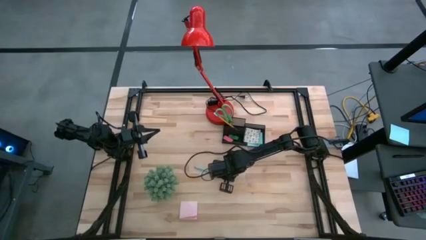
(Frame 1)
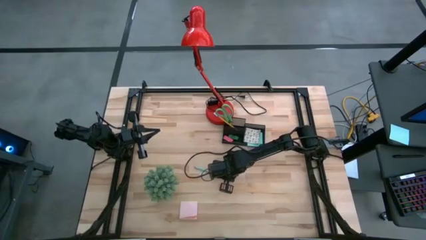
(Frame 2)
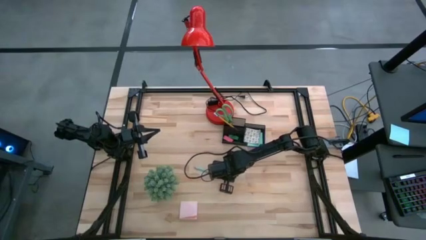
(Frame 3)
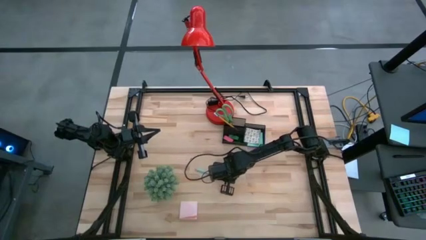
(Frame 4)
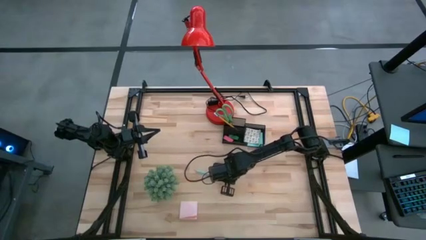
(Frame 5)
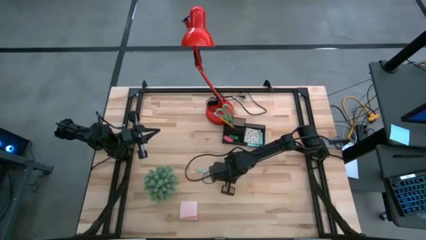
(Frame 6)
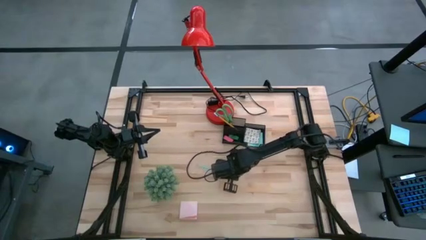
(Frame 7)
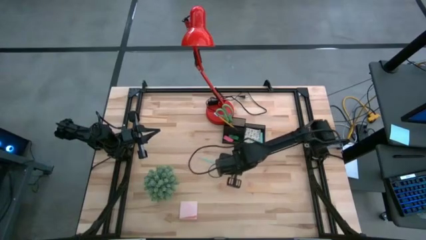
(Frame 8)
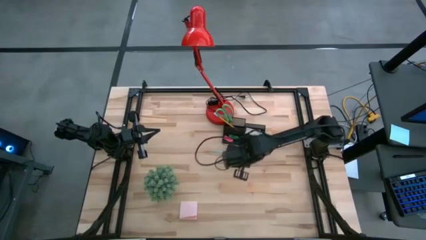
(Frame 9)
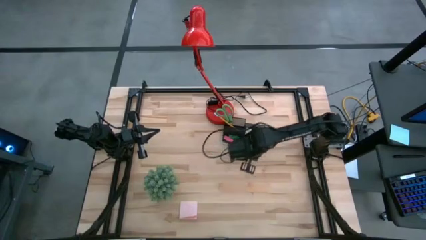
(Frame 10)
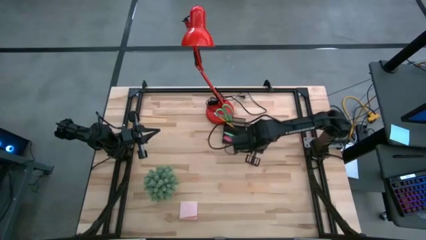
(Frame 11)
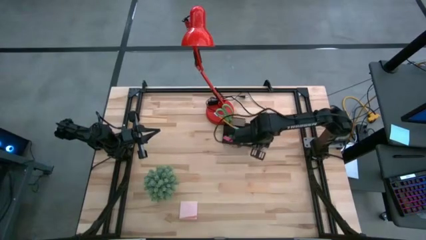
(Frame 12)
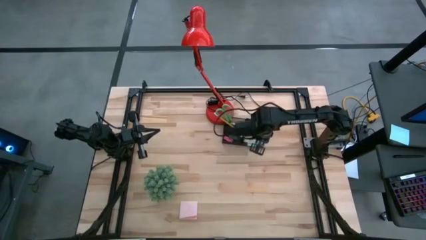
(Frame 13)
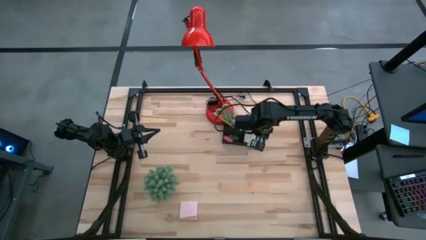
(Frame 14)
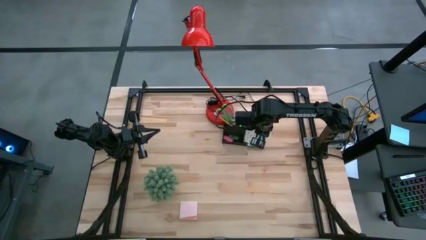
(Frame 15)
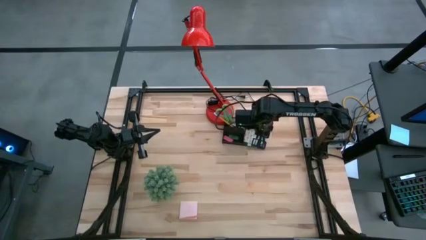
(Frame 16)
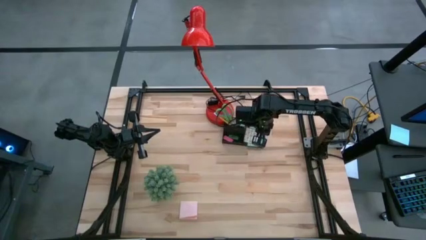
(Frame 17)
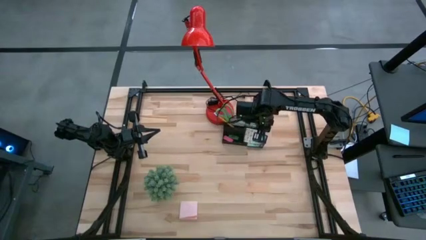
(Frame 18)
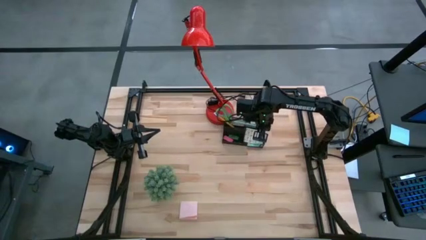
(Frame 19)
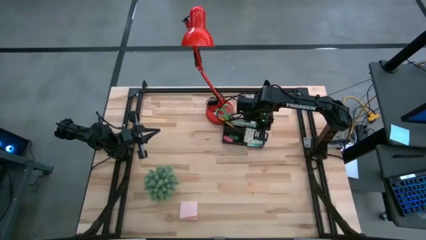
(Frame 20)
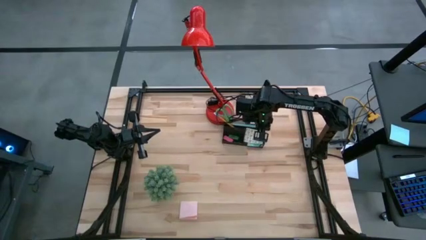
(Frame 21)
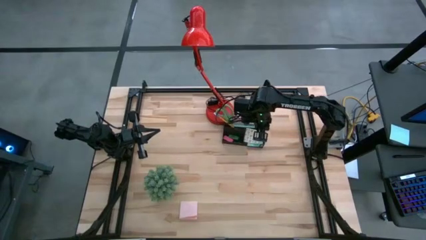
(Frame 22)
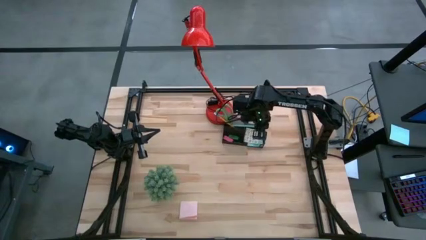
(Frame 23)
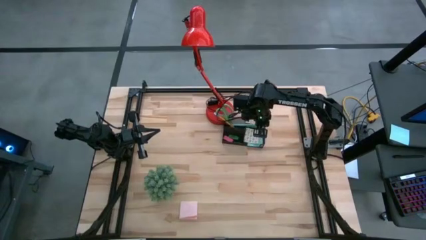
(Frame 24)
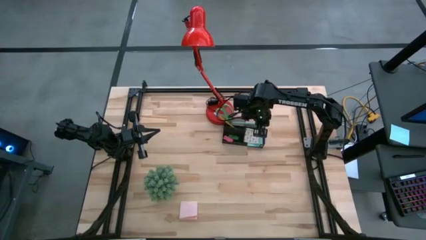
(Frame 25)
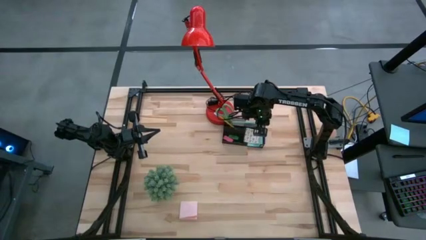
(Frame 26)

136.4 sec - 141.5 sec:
Task: Pick and place office supplies into organizer
Put the blue pencil in the back left compartment of the desk organizer

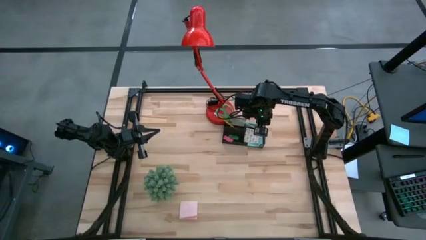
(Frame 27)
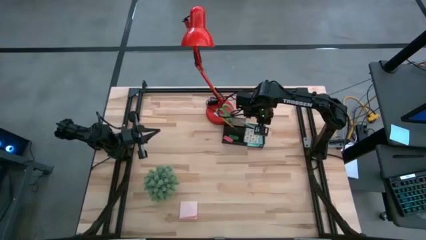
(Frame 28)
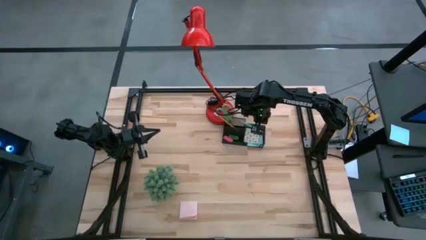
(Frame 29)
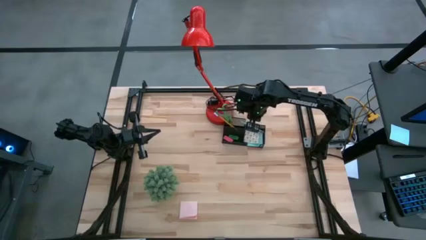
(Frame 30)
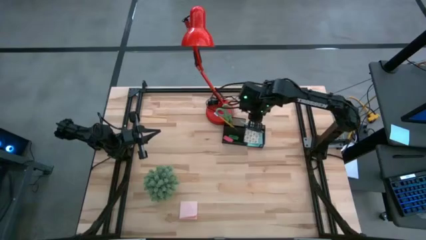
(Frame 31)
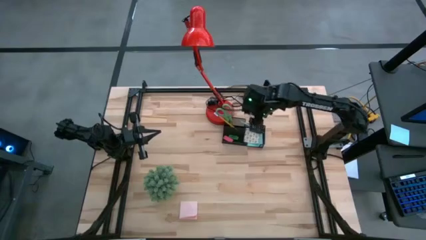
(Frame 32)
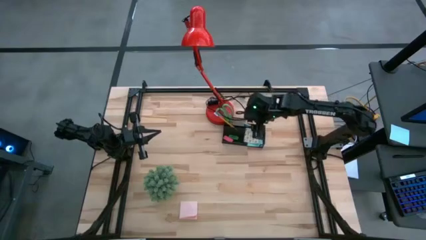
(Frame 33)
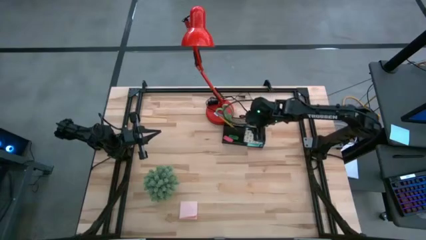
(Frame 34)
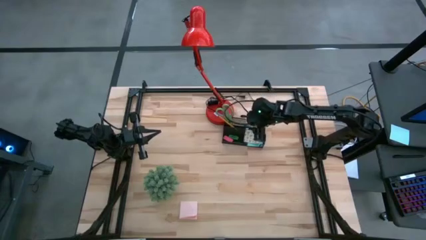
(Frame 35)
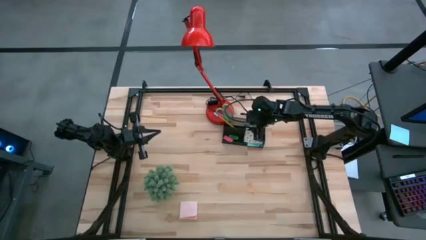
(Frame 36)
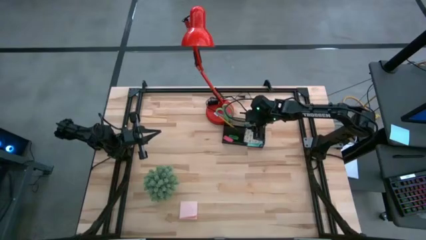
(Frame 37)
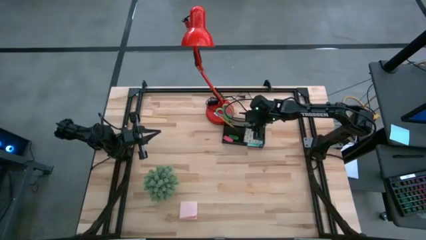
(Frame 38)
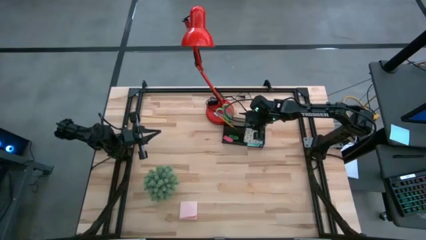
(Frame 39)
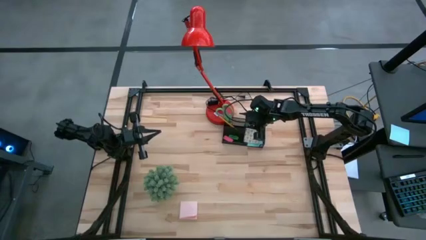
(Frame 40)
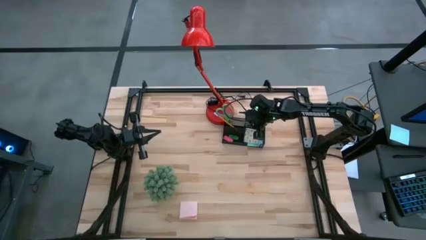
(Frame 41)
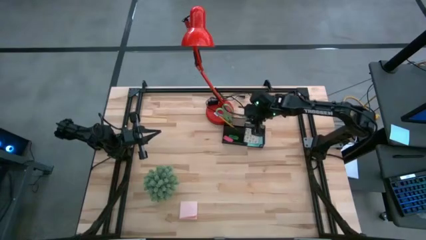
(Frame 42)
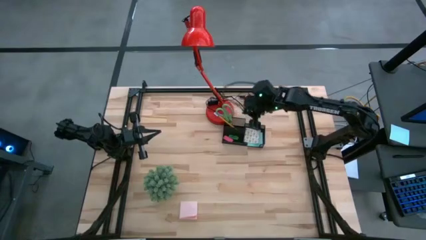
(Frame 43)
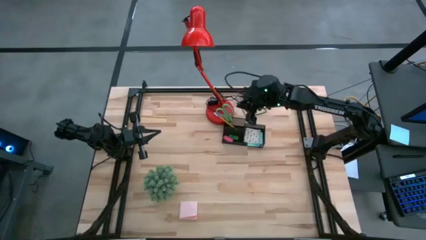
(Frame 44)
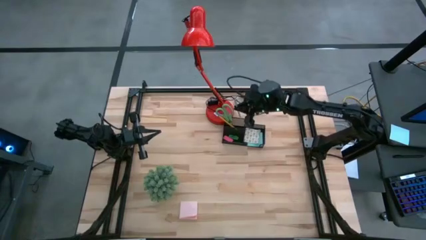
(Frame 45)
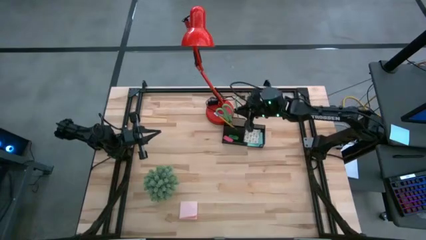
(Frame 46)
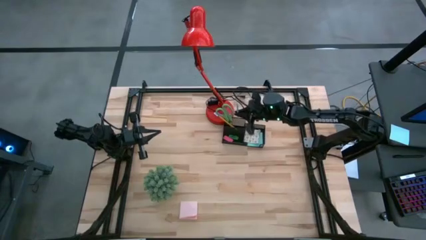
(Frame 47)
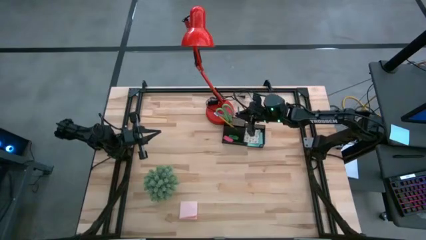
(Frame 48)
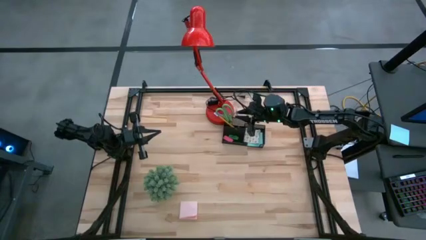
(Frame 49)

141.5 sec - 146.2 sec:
Adjust the blue pencil in the desk organizer

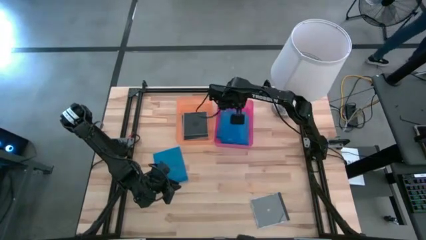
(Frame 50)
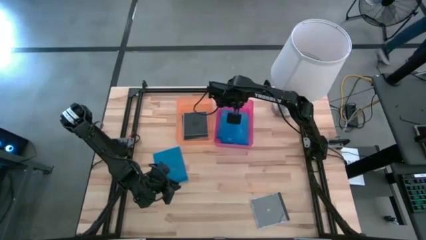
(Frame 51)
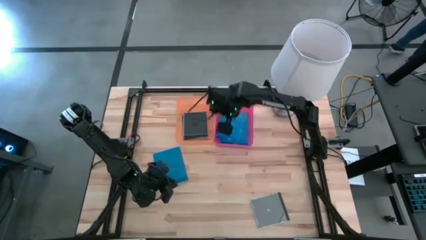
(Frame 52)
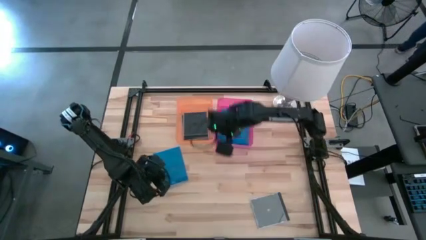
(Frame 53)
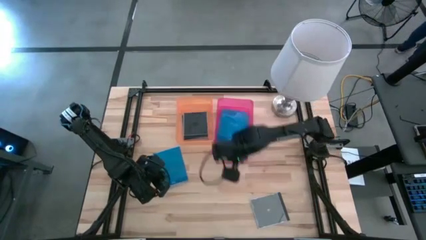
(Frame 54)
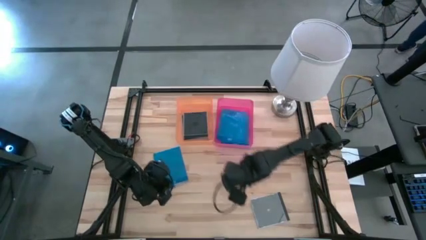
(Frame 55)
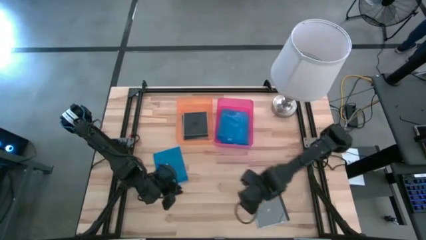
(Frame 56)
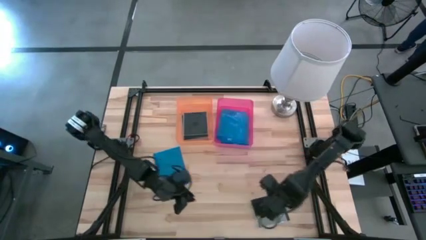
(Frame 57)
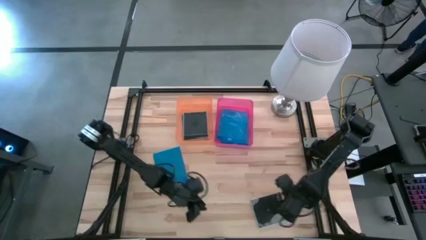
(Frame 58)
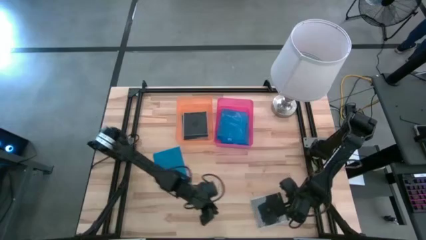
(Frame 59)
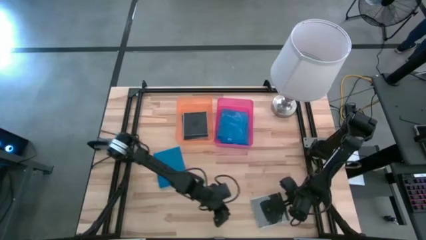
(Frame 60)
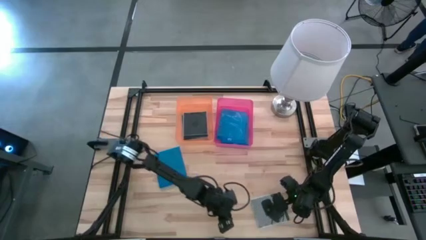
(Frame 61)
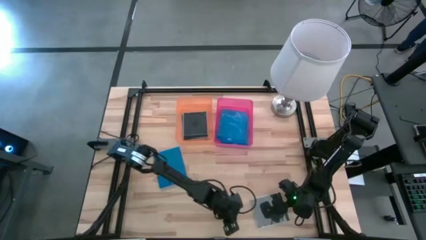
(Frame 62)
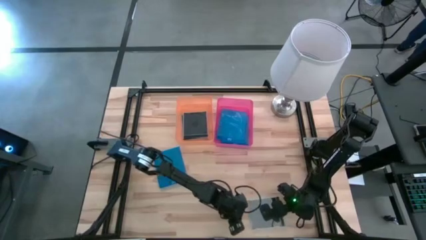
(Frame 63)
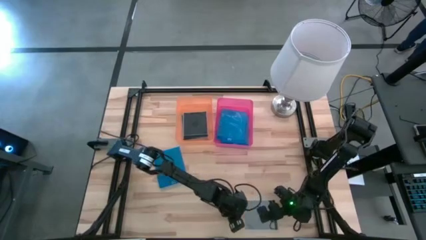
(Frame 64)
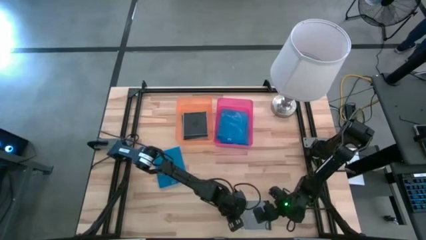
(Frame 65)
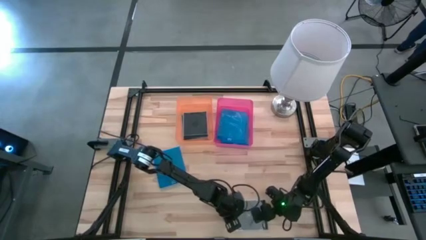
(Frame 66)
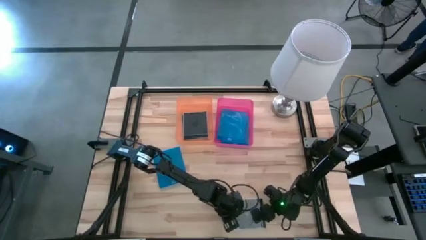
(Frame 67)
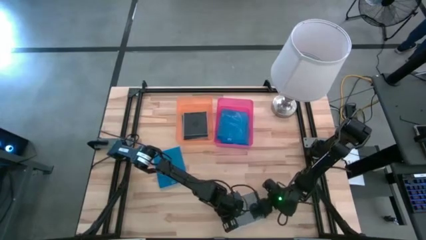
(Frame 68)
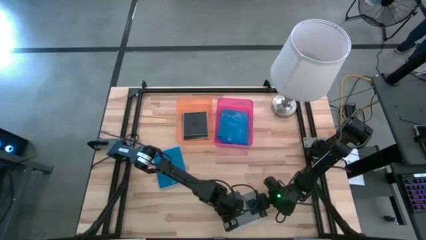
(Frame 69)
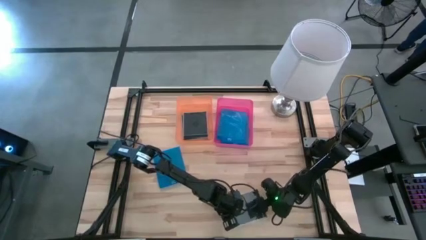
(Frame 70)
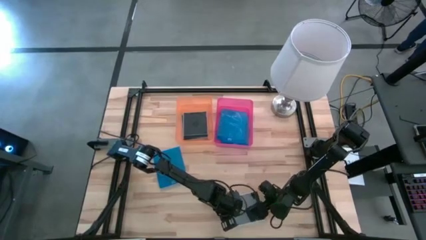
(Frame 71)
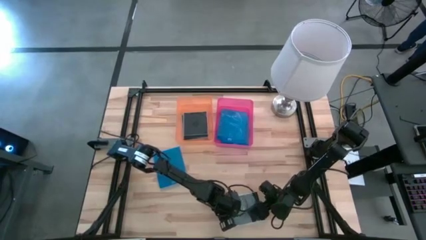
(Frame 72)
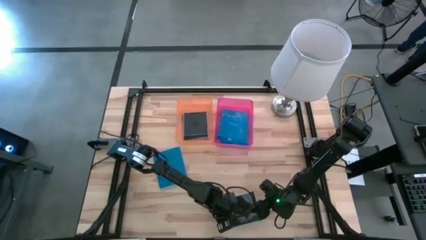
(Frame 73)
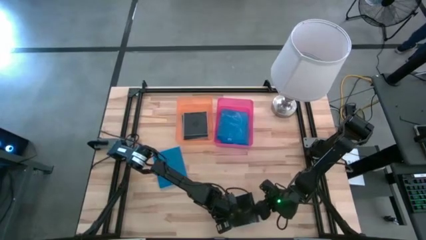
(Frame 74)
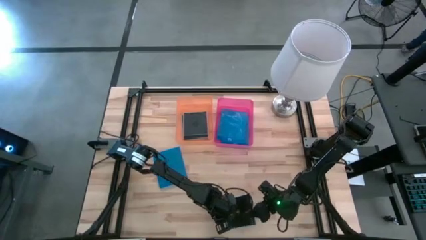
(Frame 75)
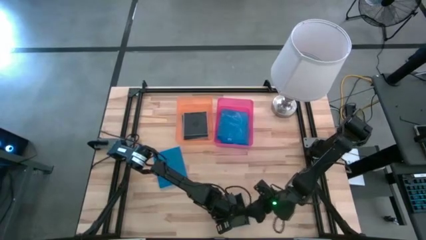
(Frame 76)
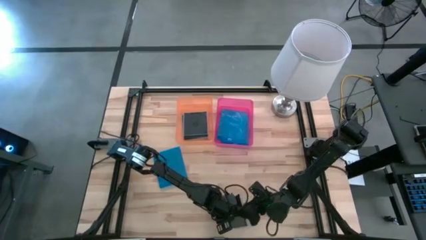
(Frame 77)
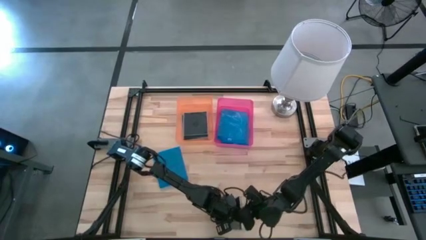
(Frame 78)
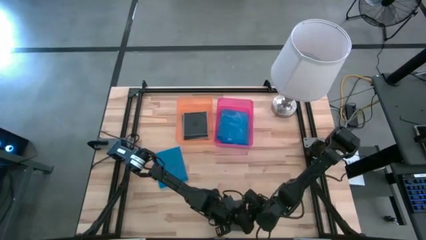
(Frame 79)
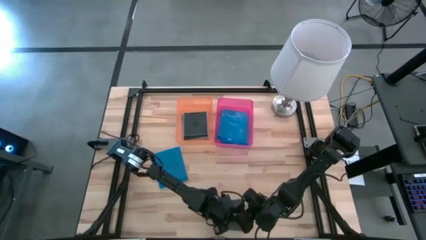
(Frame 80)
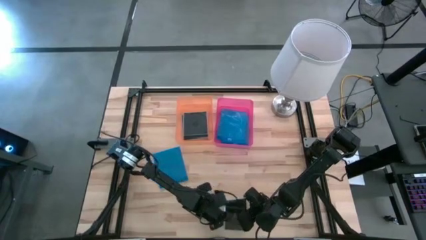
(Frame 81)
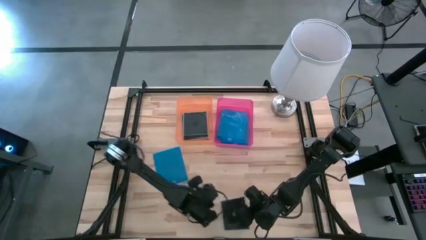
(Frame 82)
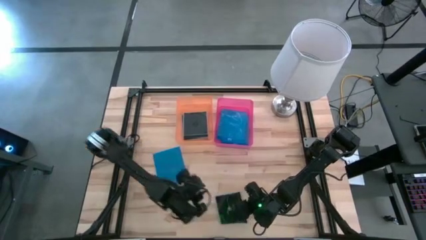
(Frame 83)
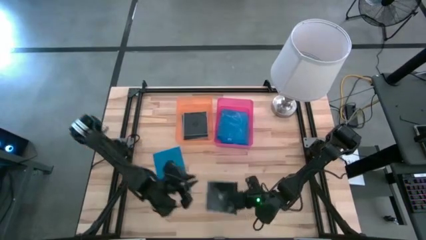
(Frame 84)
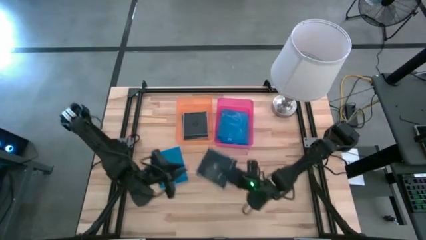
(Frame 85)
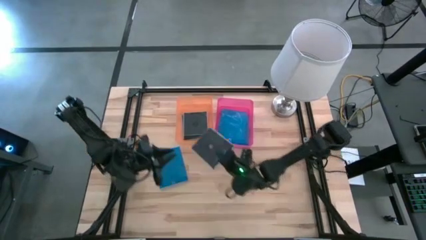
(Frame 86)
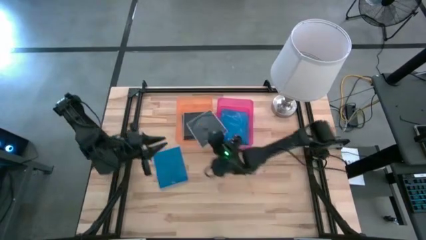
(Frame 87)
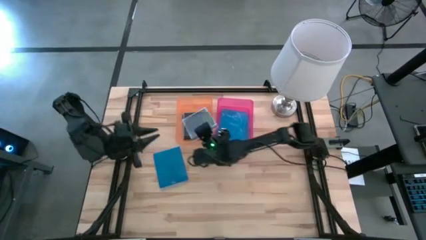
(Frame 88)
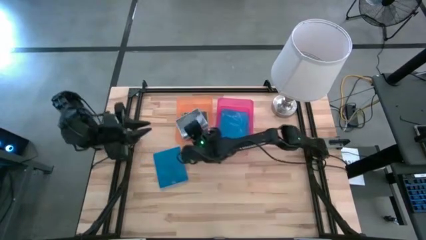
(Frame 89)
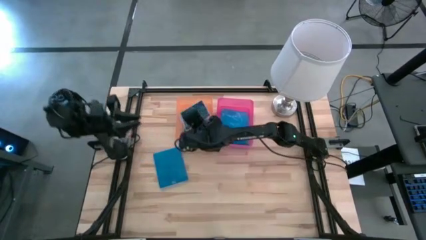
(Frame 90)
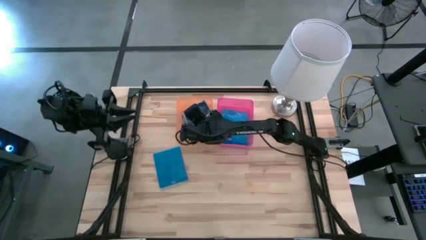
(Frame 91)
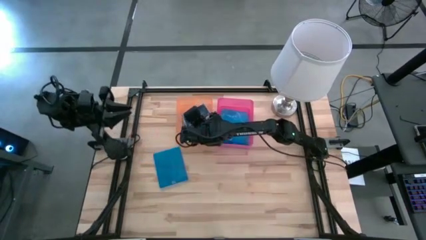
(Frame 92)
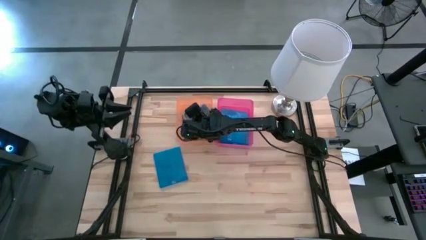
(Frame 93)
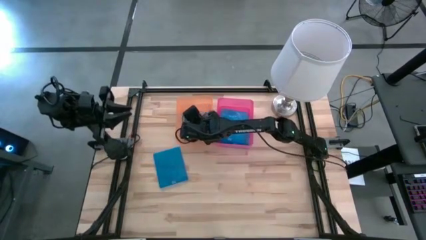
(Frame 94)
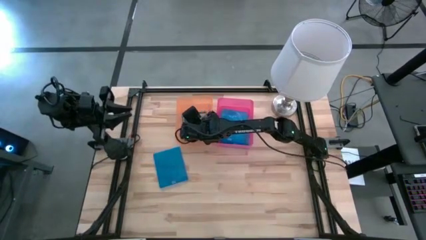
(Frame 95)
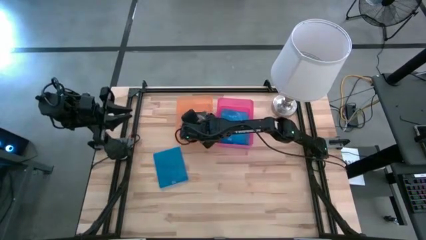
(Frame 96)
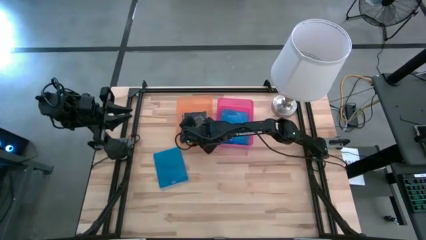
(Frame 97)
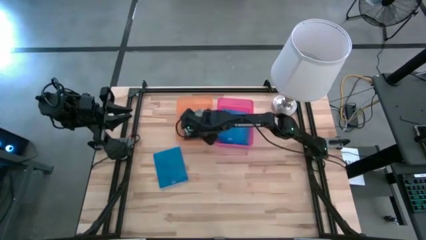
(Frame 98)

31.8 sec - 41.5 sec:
Task: Pick & place jewel cases by type
Put the black CD case into the orange bin
